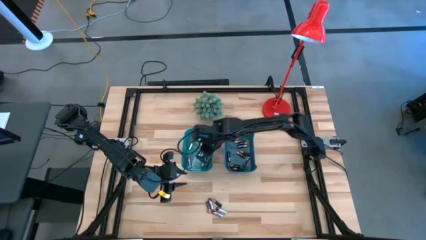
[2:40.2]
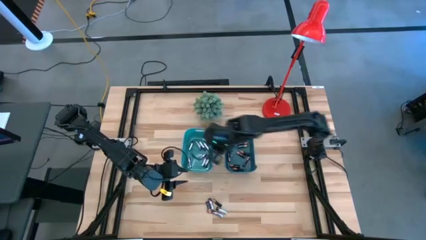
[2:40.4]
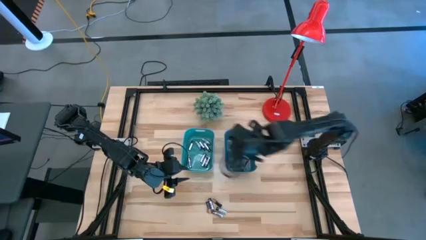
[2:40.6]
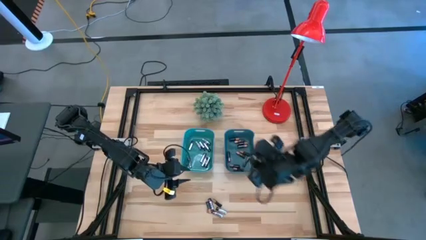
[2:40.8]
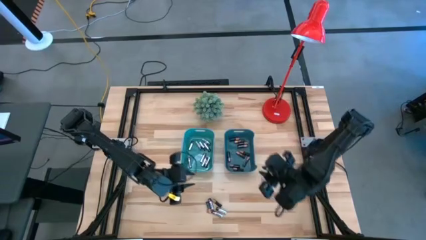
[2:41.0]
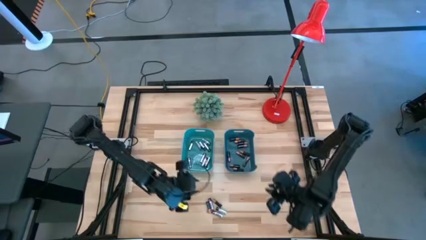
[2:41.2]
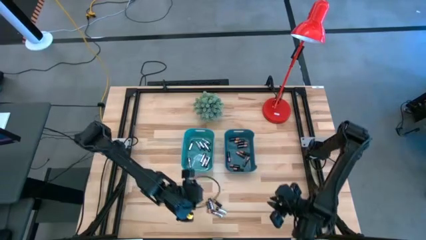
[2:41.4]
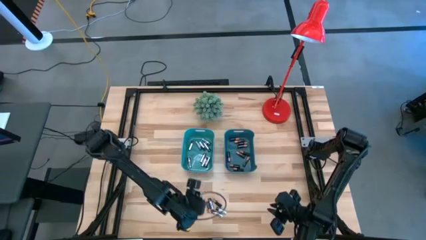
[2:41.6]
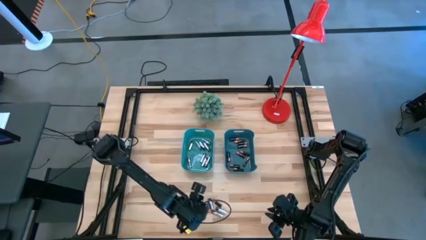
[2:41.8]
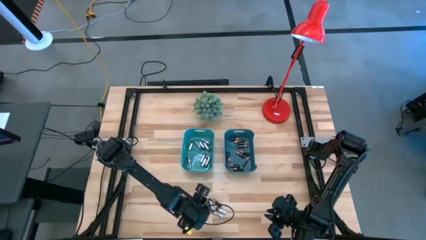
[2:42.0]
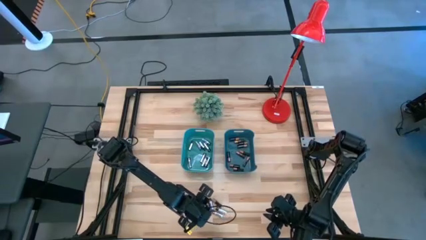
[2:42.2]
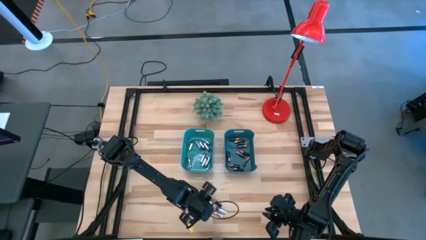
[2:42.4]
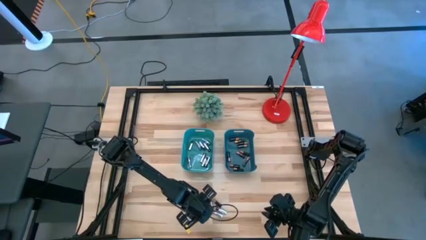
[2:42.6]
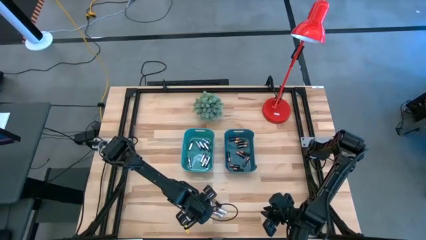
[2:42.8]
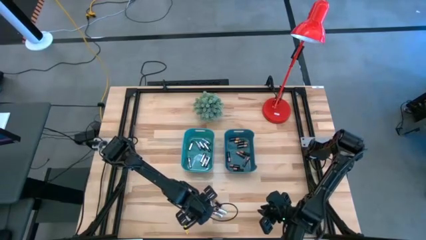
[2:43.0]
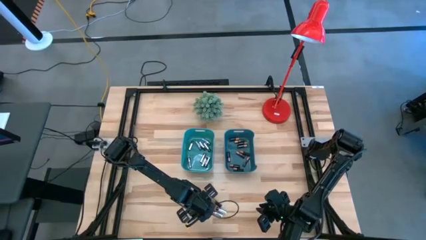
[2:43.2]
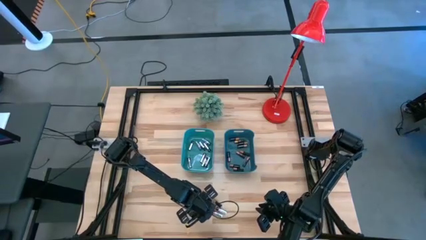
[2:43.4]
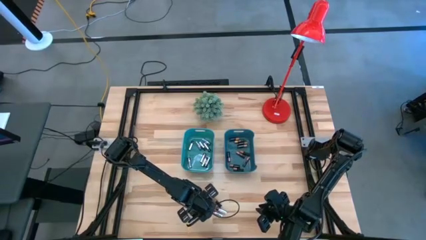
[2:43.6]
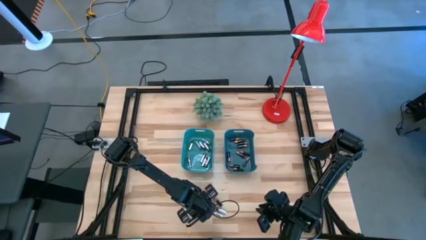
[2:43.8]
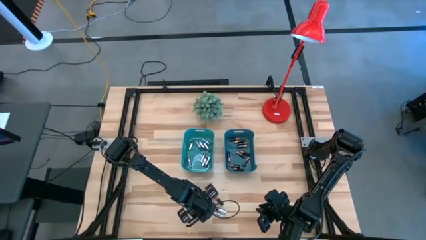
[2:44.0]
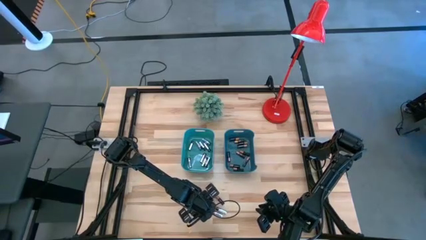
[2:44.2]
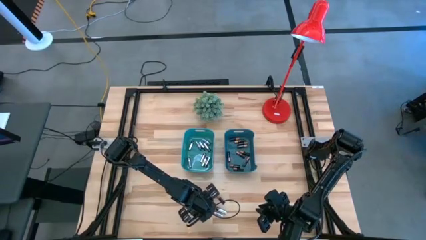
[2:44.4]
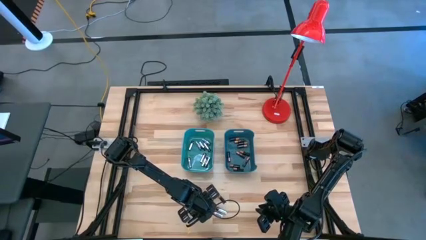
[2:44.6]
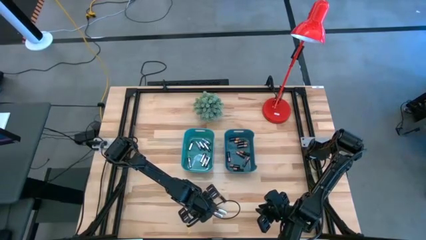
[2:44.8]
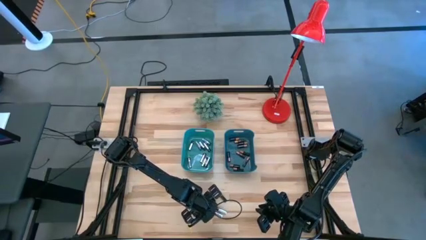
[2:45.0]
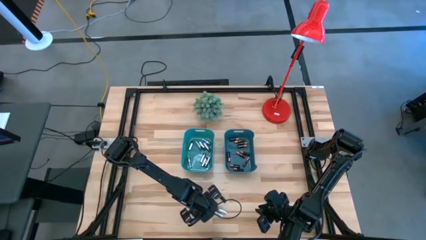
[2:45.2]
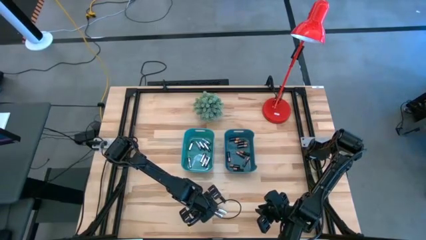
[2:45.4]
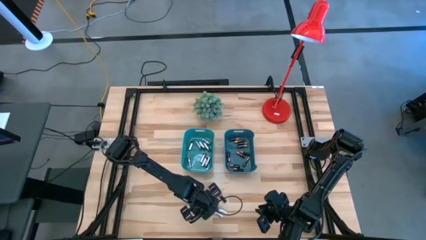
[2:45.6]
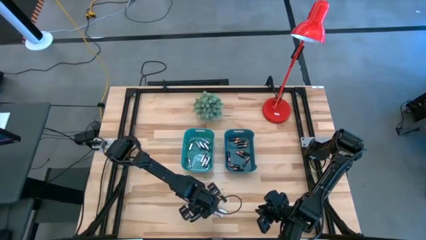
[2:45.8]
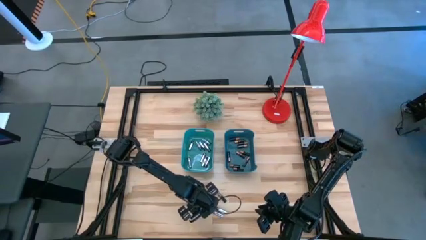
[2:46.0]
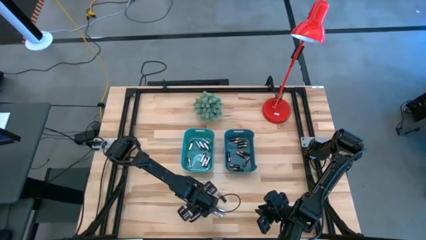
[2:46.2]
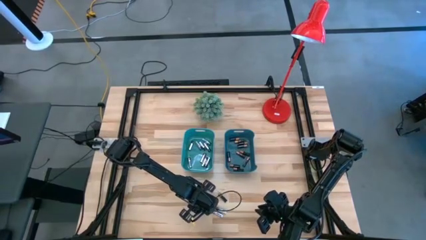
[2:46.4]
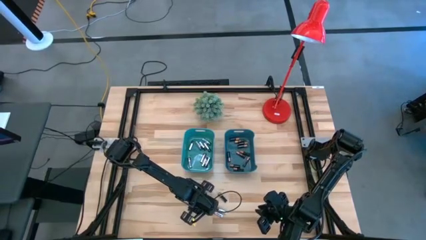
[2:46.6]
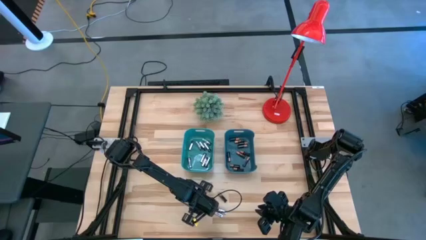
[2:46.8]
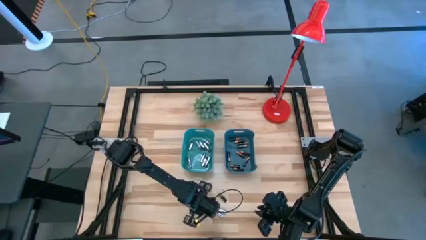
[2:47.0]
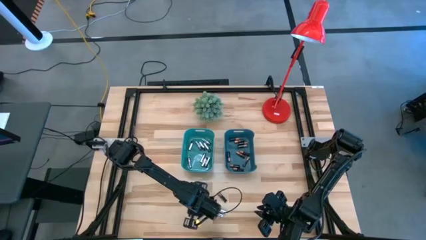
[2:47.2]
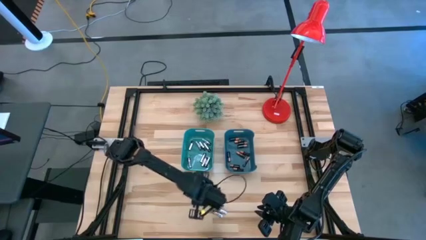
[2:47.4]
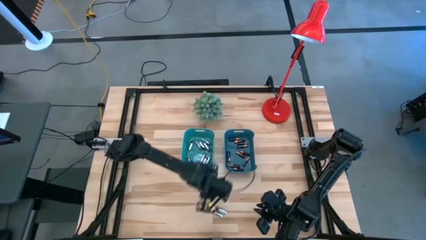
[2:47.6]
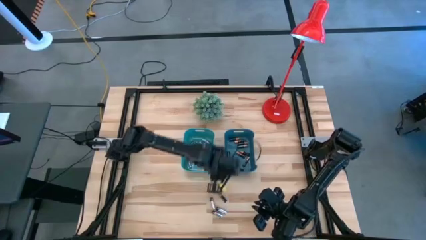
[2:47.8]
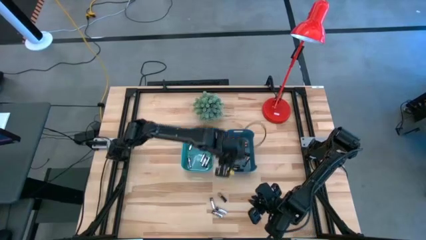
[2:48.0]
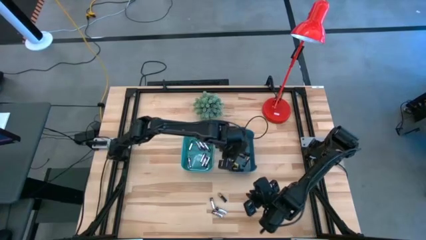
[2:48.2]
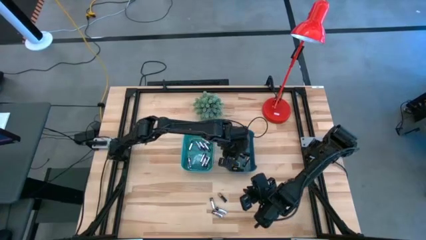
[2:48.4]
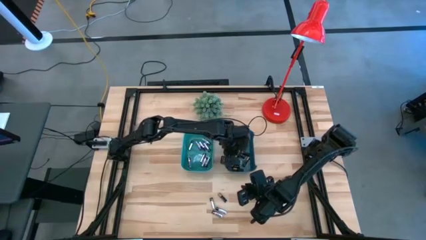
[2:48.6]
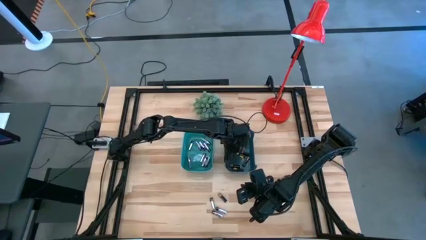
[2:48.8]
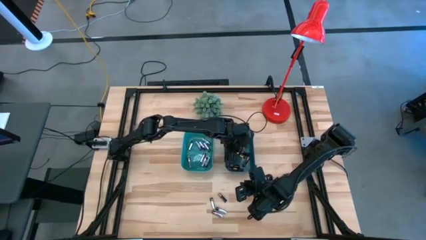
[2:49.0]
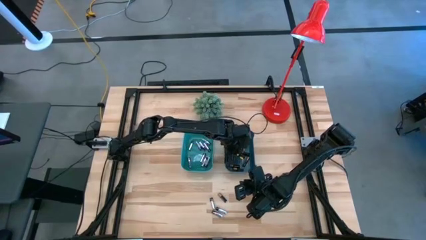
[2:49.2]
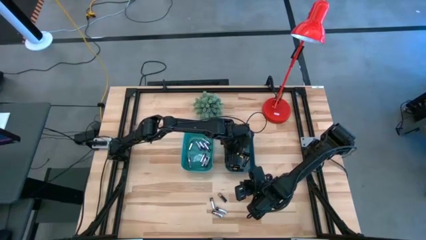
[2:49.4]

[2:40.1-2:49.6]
Task: Sort batteries
Put the black battery into the blue bin

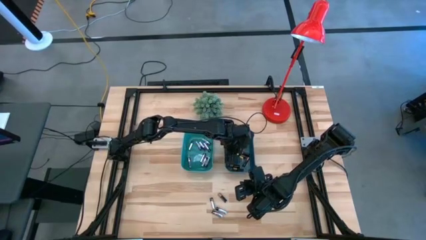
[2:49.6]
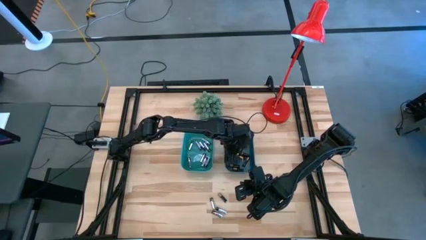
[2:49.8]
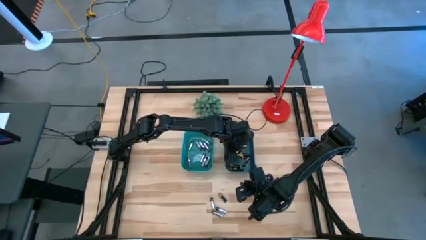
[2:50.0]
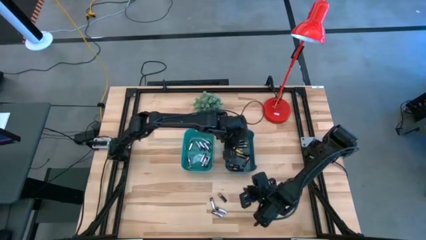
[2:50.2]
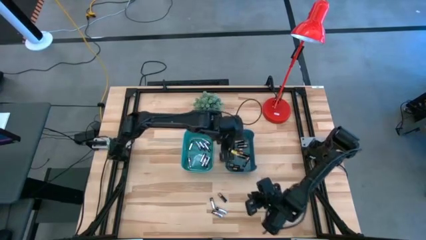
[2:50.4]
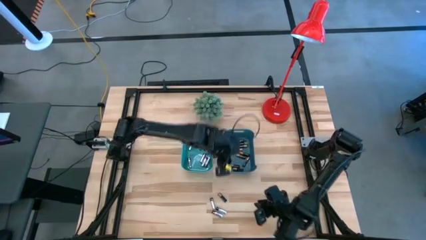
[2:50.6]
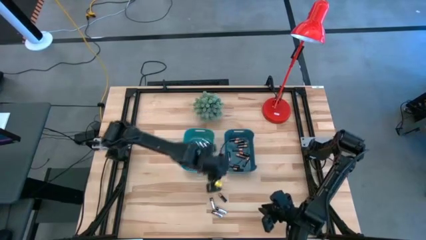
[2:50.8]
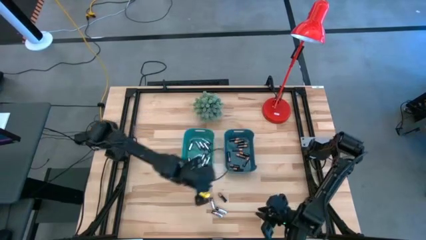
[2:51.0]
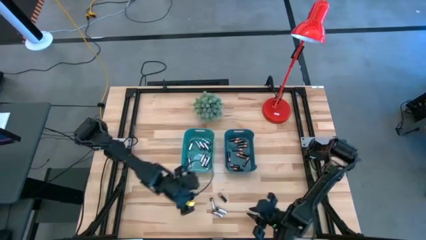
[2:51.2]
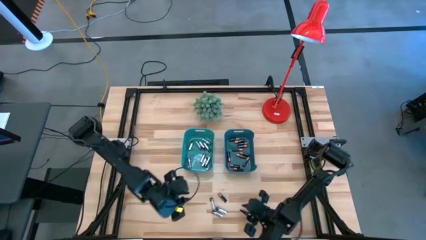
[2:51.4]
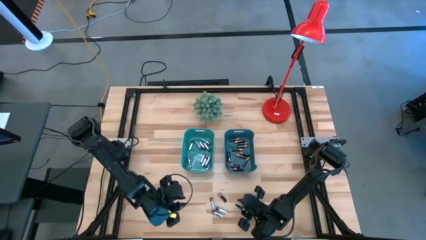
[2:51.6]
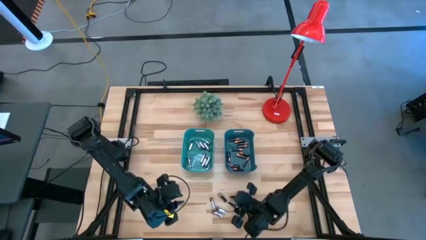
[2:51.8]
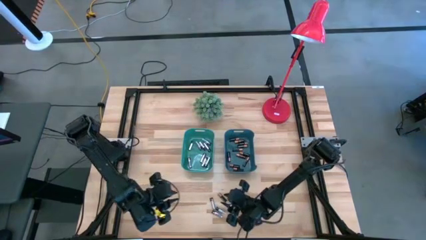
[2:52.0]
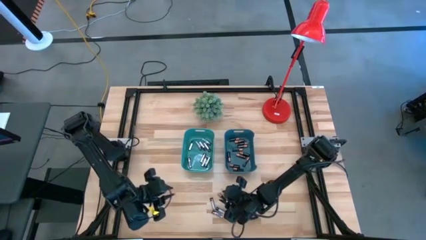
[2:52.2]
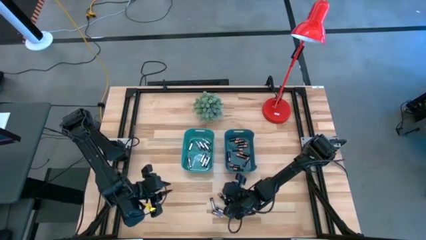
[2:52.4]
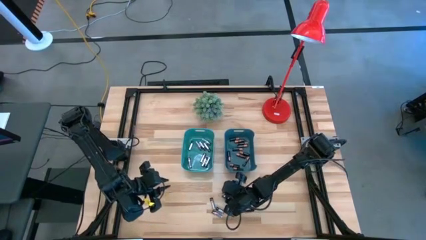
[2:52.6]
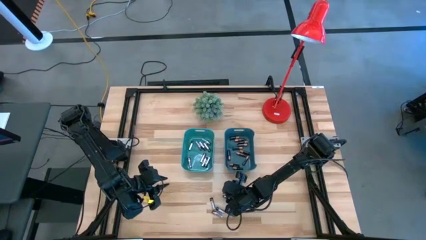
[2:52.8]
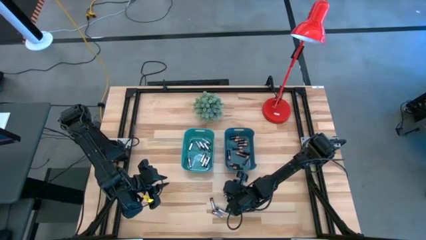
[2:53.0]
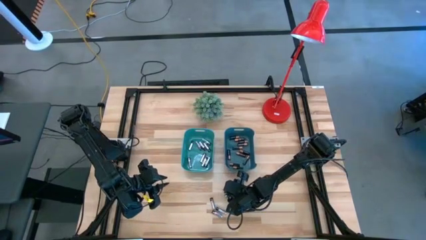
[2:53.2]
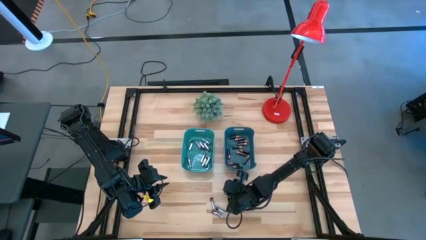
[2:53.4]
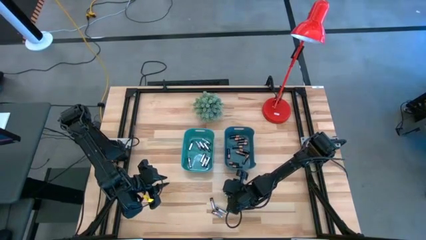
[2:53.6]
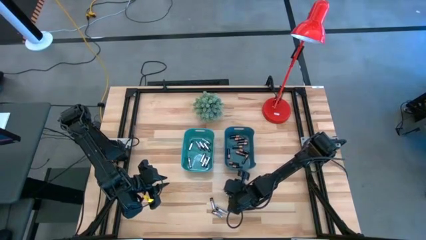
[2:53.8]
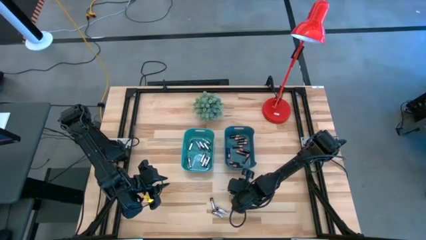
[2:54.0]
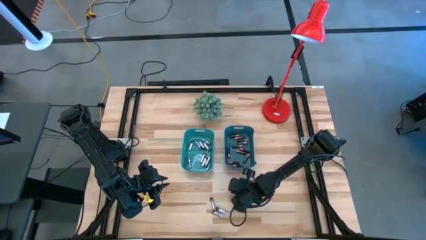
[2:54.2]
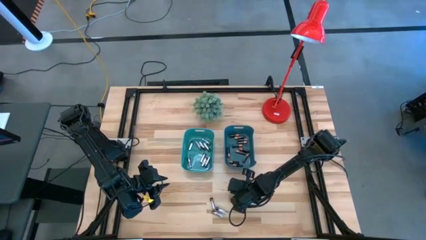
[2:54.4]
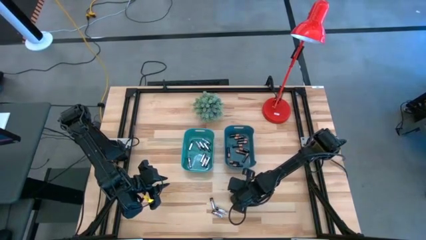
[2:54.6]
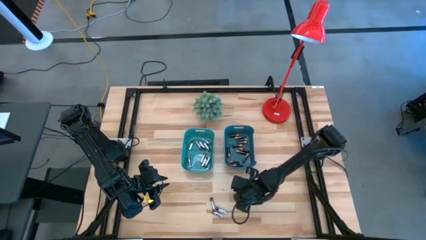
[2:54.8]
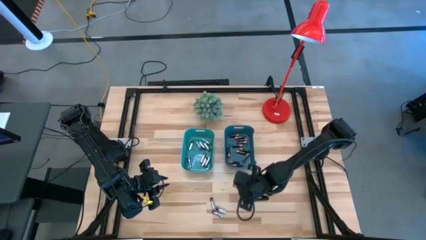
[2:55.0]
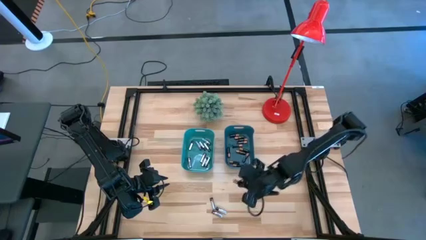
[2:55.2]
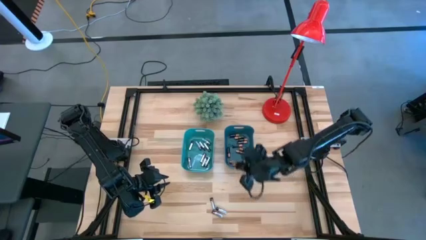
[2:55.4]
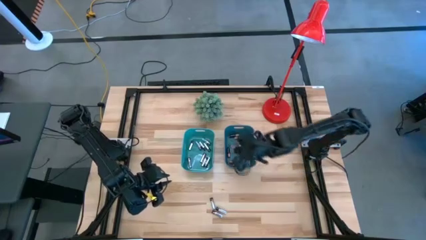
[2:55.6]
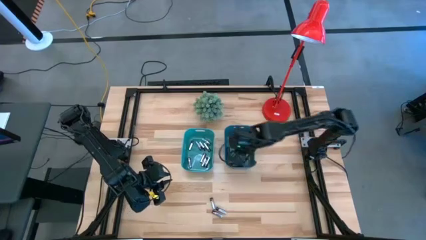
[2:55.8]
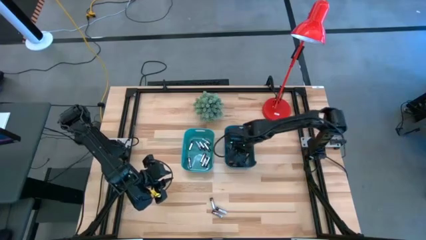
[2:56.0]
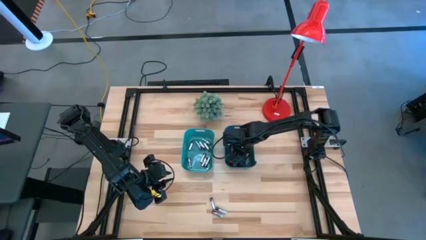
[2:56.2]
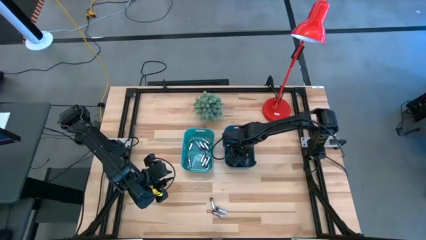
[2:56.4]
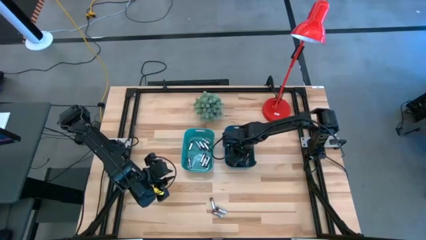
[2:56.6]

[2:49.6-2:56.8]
Put the black battery into the blue bin
